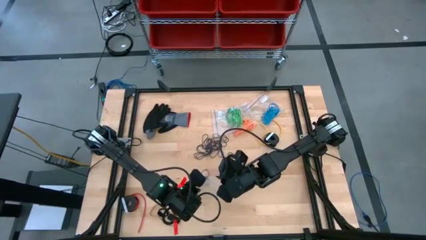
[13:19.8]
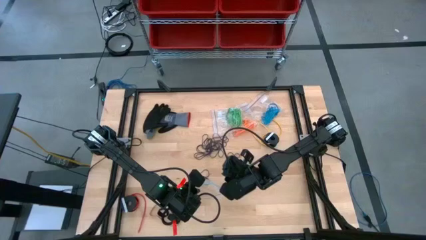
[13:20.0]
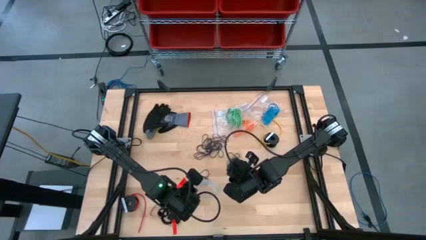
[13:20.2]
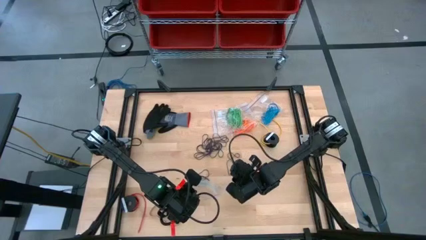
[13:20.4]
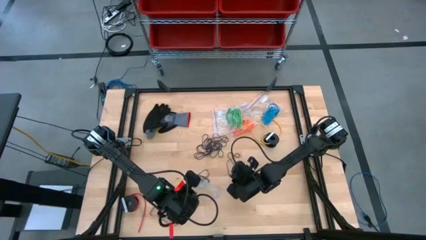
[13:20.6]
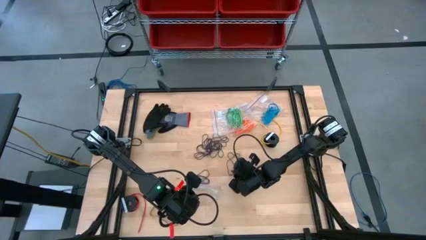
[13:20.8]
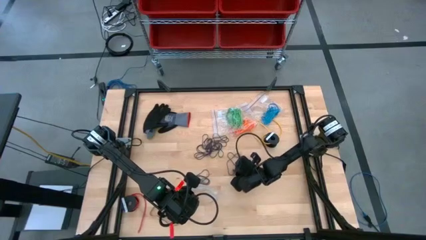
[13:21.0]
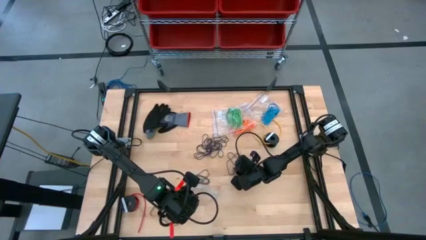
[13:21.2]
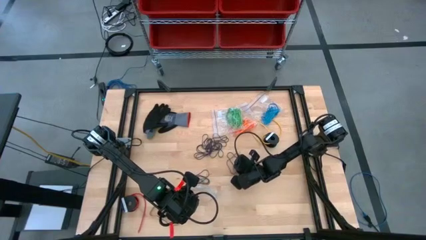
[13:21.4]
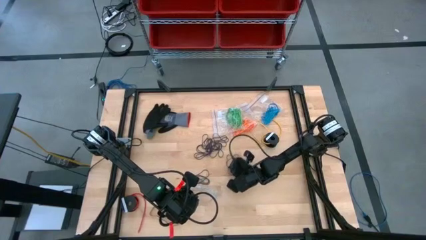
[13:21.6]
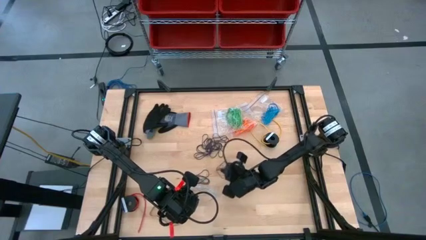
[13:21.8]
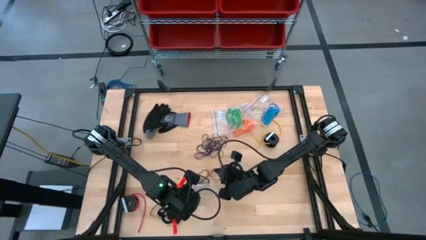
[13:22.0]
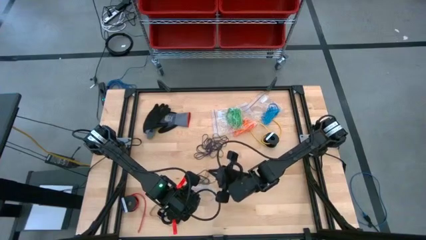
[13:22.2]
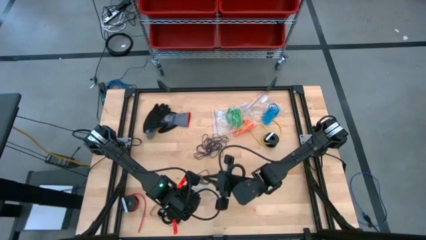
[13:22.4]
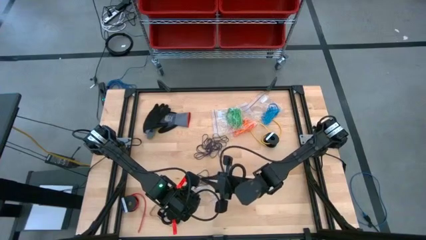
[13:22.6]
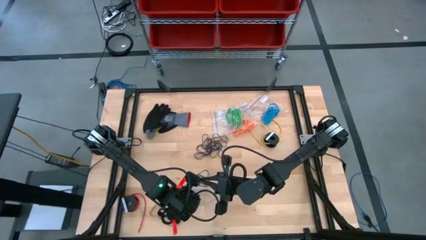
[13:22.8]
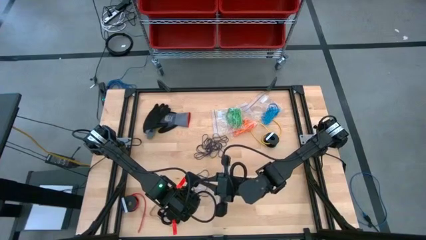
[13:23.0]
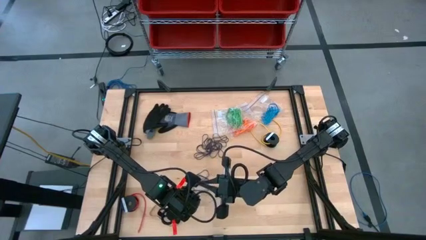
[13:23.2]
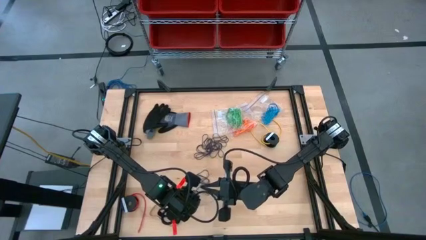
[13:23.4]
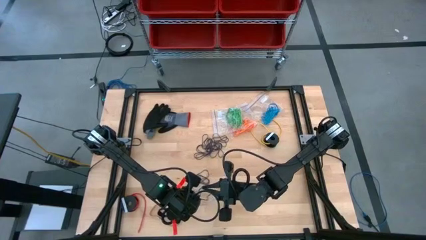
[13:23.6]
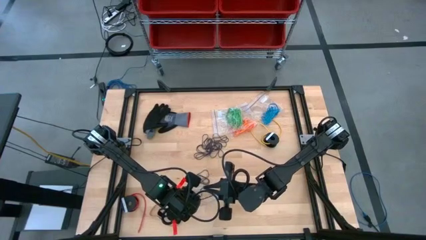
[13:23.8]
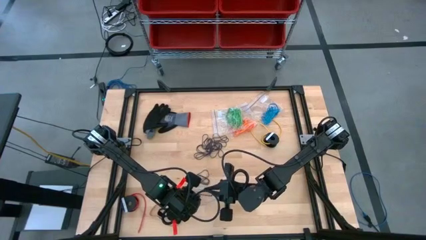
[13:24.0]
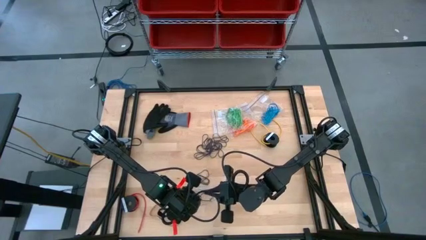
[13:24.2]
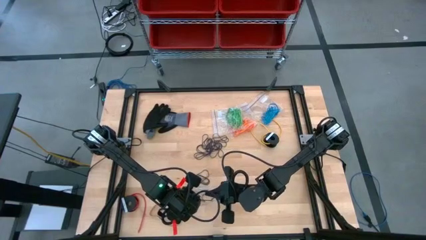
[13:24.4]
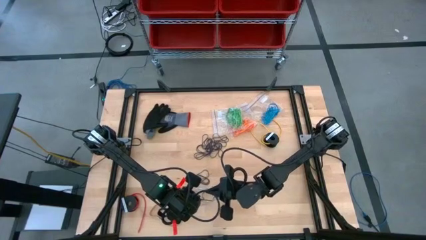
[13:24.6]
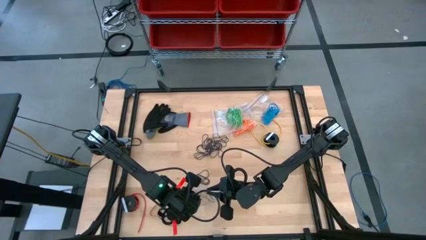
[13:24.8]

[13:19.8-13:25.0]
Task: Sort rubber bands
Put the black rubber band into the transparent zip bag

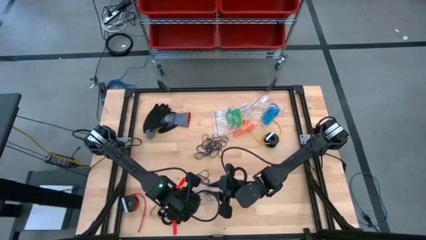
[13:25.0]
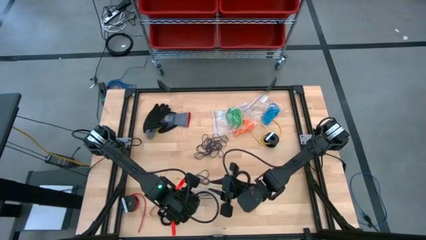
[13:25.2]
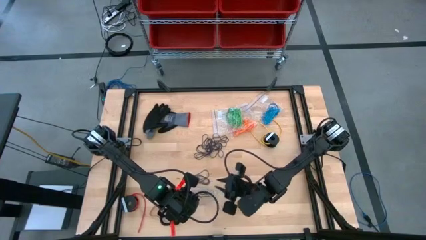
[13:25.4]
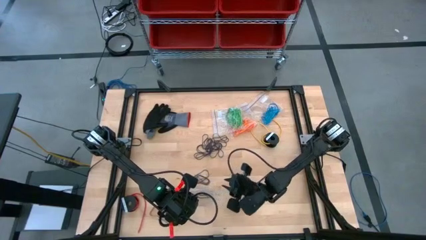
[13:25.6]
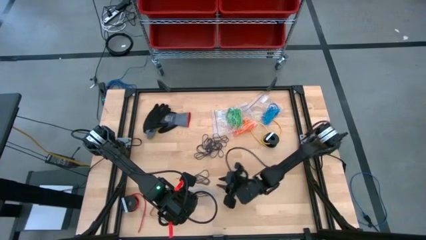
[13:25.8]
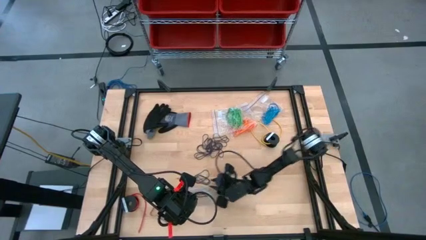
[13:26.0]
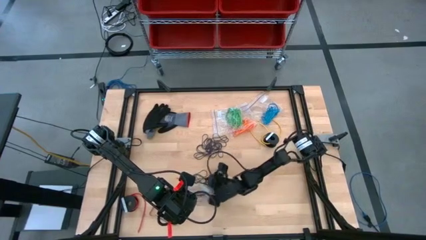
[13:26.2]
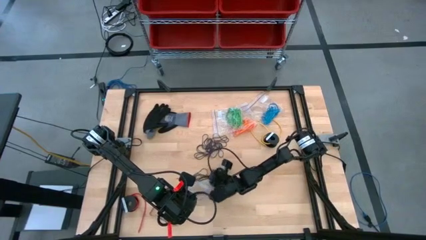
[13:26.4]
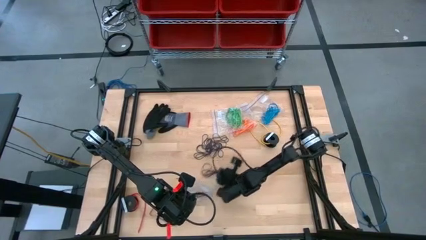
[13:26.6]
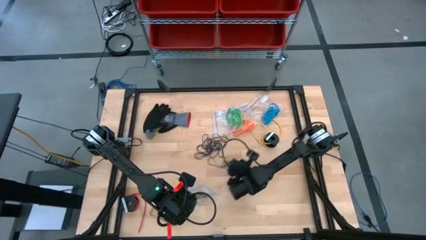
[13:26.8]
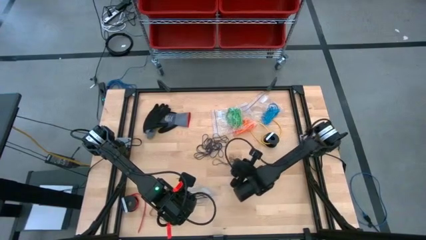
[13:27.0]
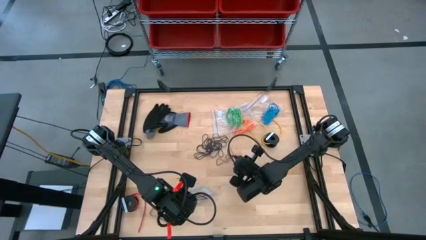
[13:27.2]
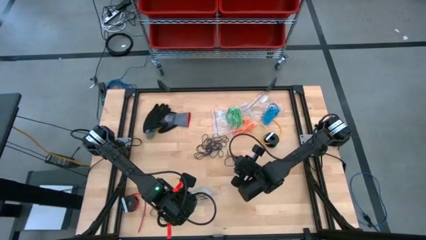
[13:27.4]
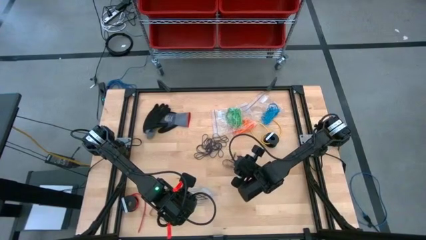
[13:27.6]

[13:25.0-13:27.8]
Put the black rubber band into the transparent zip bag

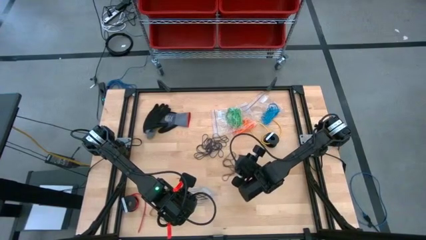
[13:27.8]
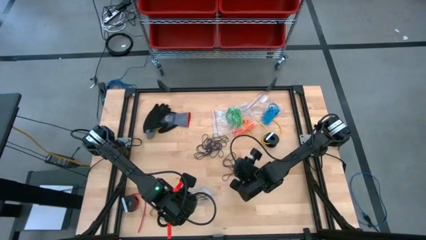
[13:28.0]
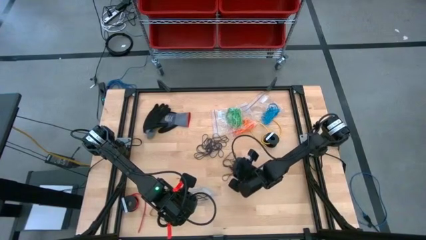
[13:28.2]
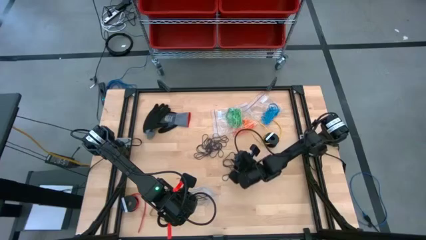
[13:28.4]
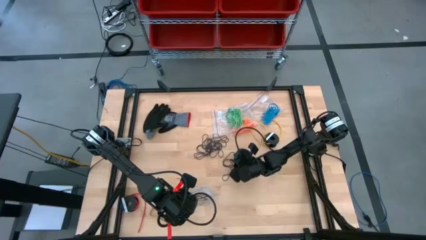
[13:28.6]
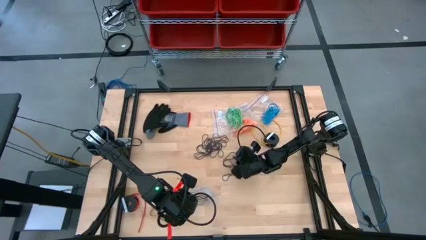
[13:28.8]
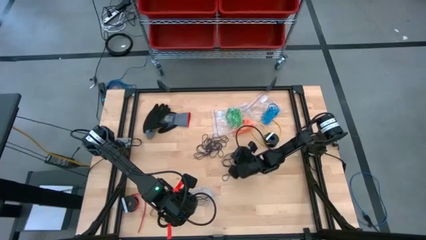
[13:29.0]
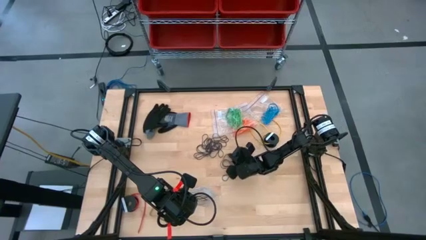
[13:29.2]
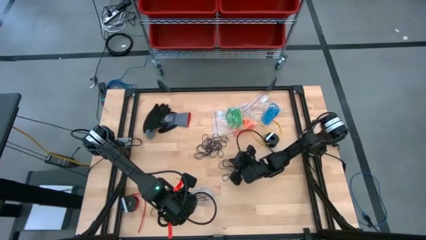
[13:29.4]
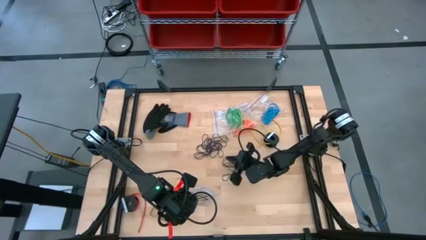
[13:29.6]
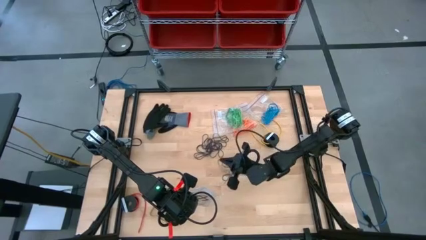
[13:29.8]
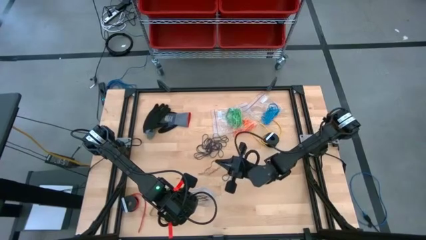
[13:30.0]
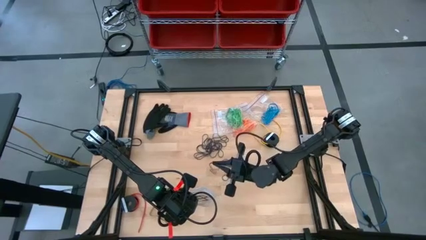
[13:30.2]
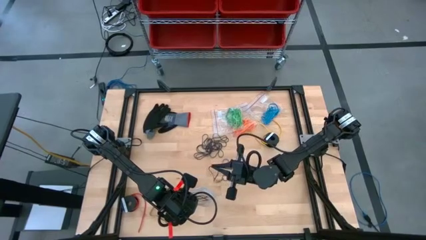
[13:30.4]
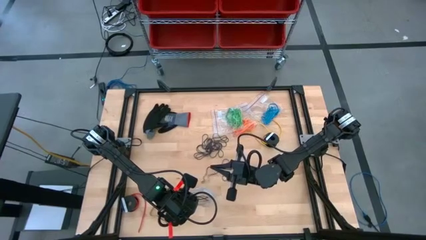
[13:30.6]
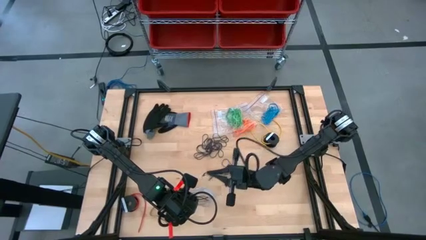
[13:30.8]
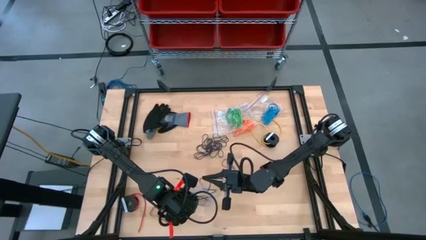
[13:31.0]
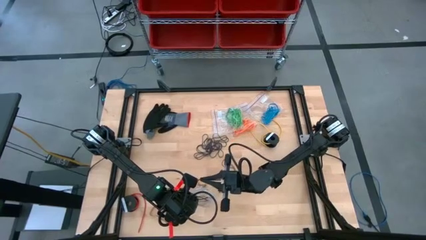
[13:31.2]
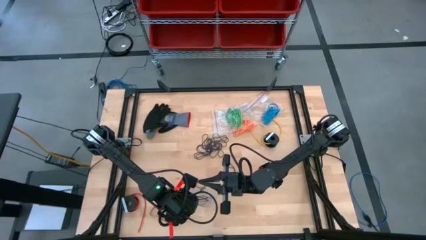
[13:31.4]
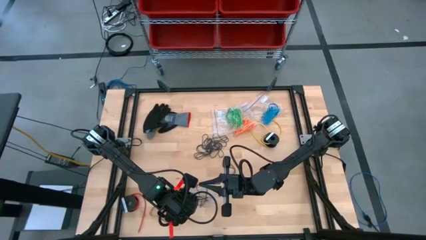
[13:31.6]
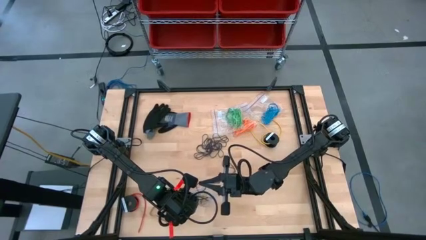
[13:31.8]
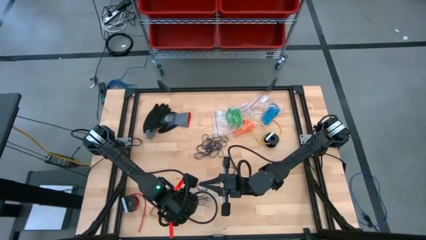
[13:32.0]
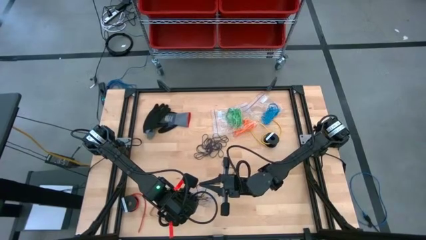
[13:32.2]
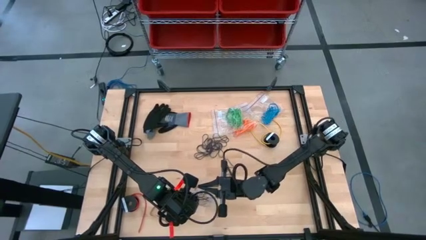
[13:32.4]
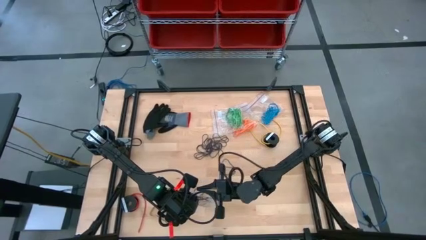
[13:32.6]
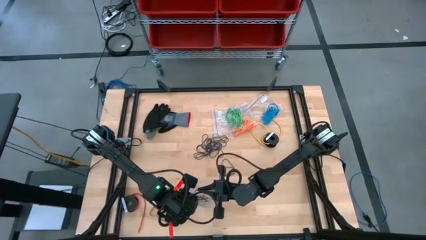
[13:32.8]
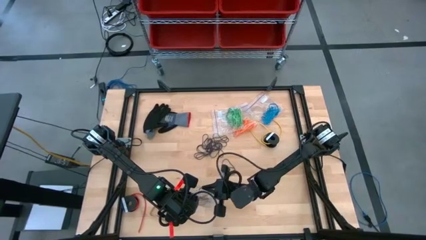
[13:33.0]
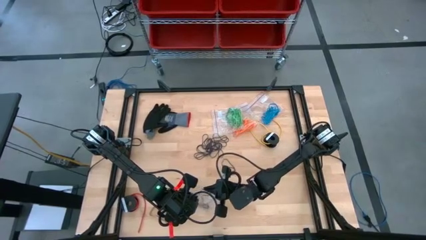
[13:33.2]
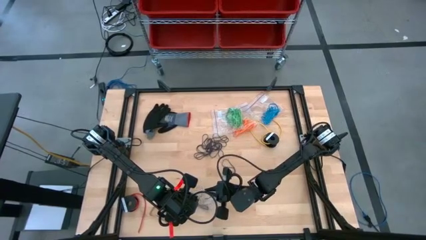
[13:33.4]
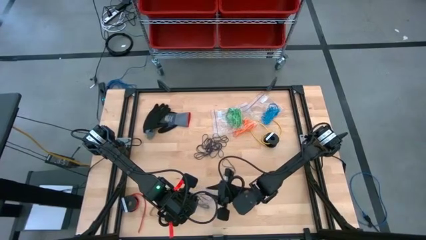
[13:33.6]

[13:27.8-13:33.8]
Put the black rubber band into the transparent zip bag

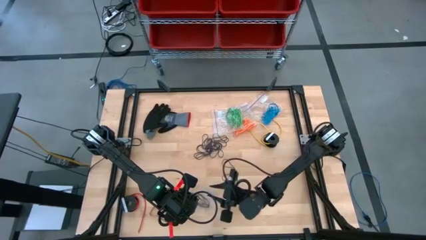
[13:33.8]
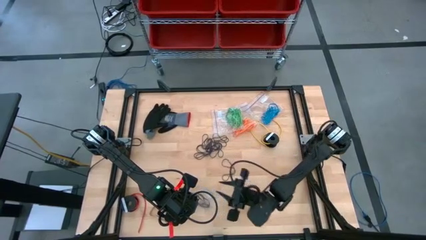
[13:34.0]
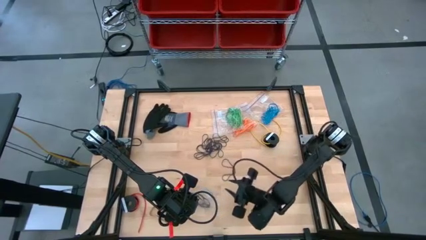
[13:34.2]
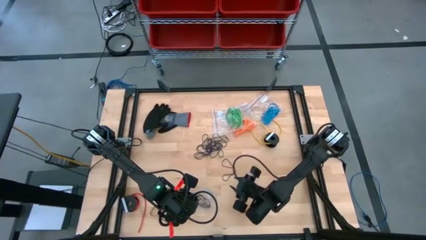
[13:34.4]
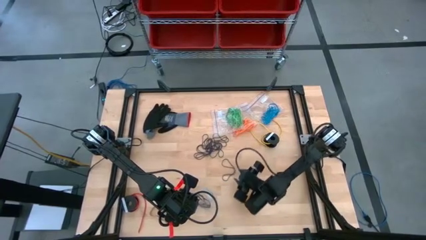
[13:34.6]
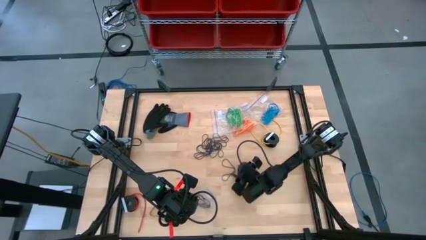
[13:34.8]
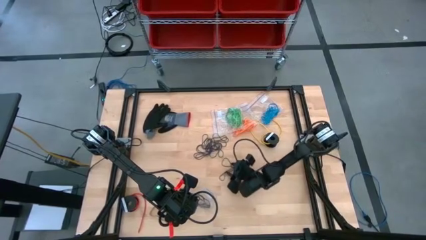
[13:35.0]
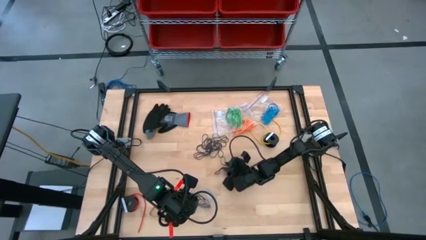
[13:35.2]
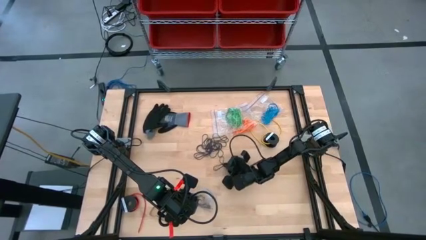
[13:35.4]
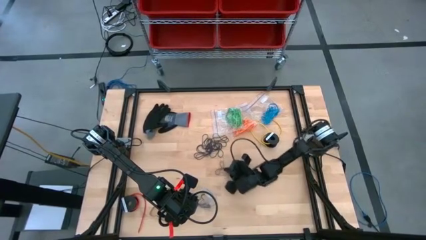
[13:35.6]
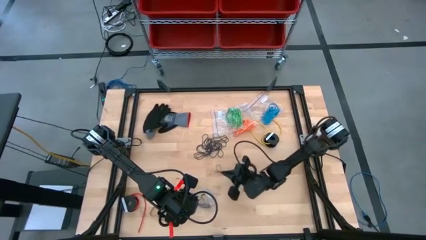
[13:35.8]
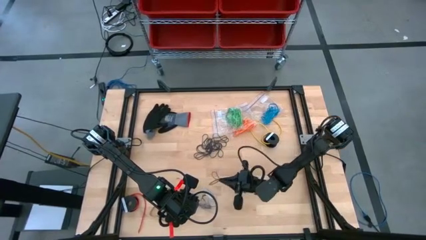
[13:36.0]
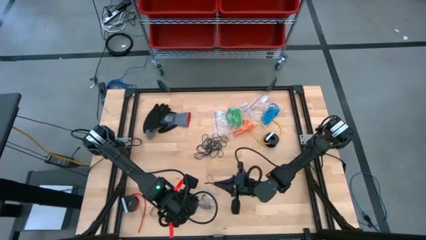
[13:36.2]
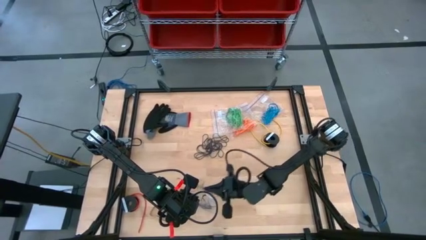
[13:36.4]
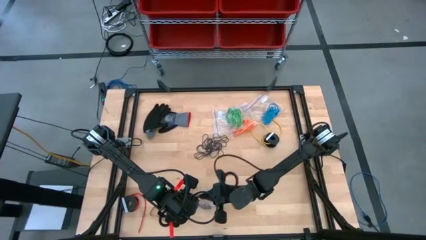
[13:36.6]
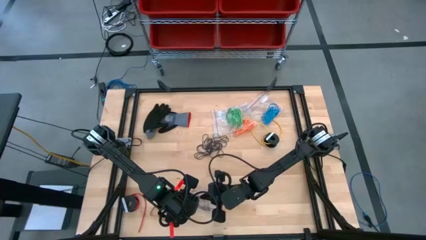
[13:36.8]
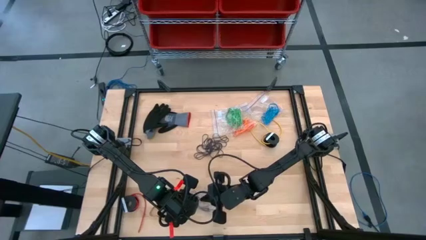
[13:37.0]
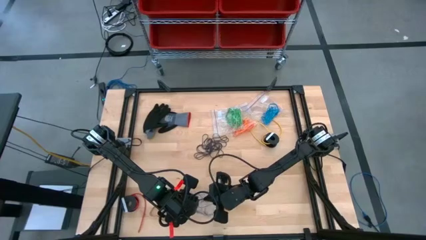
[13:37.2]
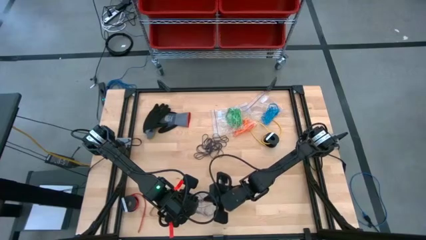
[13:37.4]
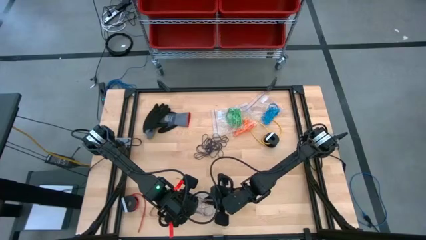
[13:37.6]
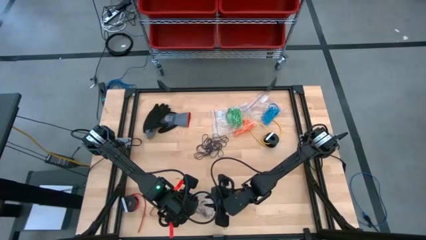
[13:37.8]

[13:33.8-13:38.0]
Put the black rubber band into the transparent zip bag
